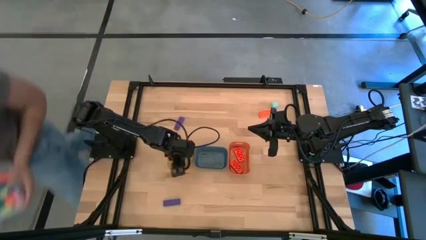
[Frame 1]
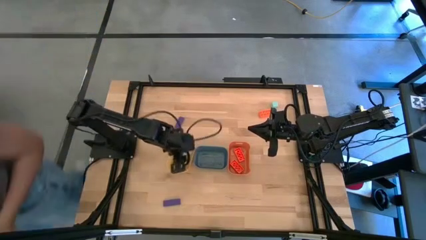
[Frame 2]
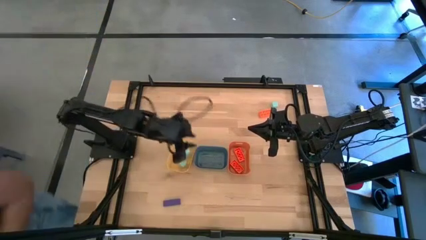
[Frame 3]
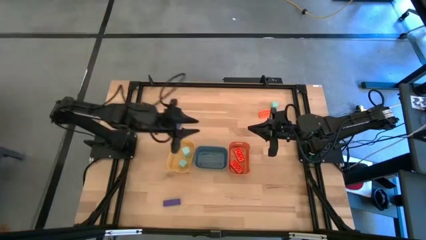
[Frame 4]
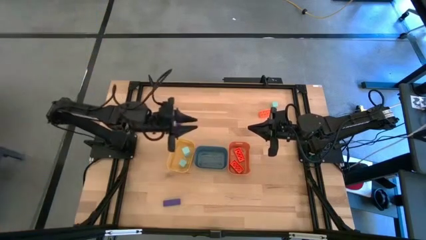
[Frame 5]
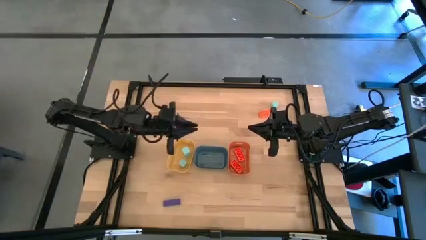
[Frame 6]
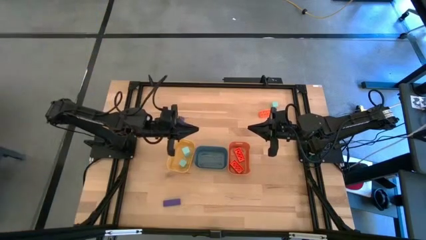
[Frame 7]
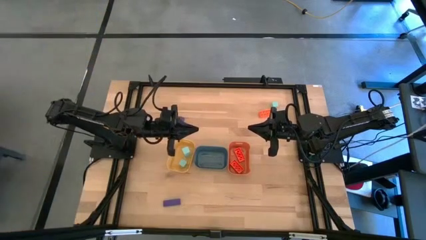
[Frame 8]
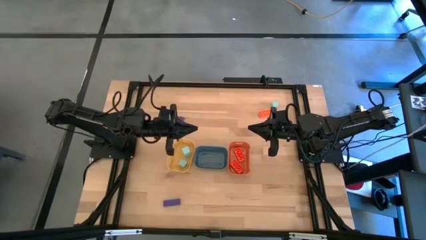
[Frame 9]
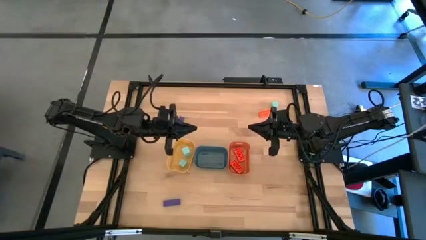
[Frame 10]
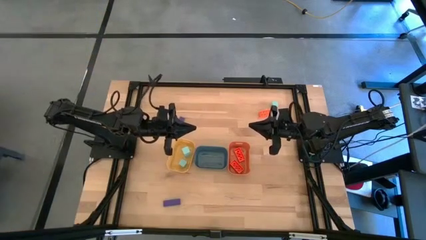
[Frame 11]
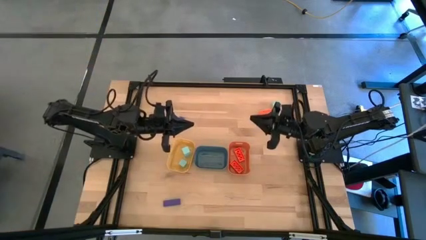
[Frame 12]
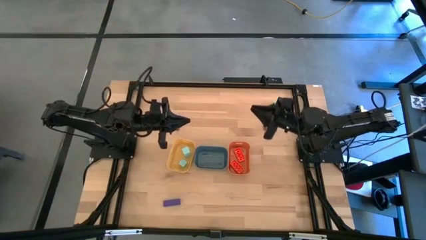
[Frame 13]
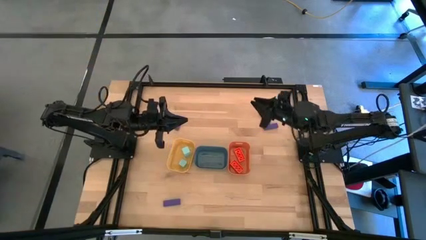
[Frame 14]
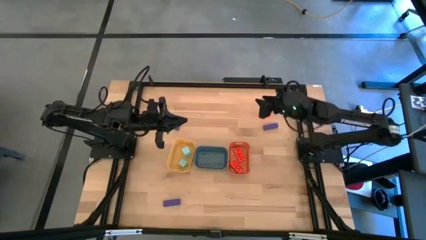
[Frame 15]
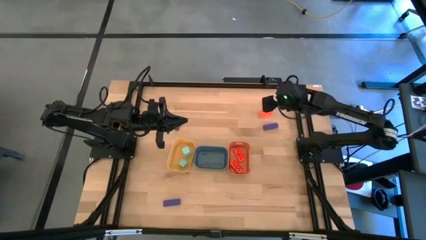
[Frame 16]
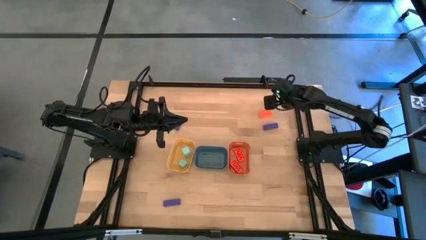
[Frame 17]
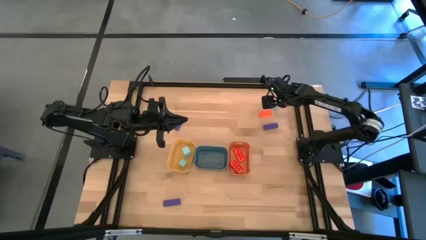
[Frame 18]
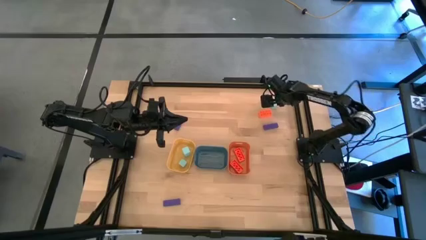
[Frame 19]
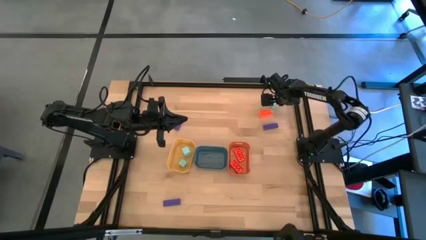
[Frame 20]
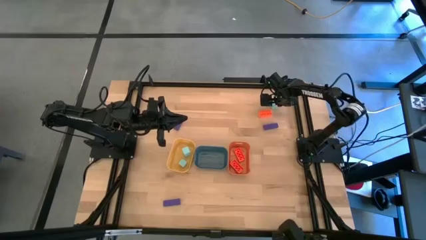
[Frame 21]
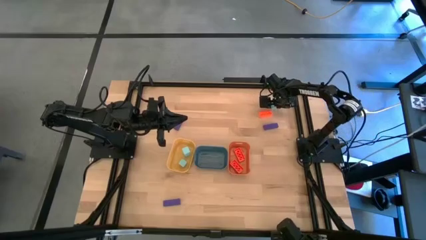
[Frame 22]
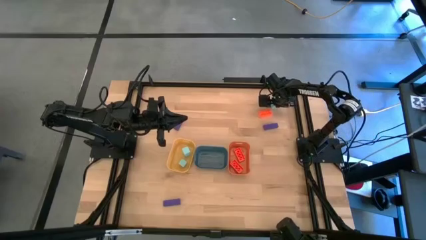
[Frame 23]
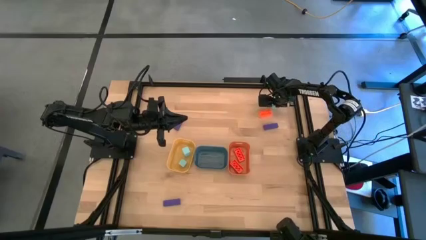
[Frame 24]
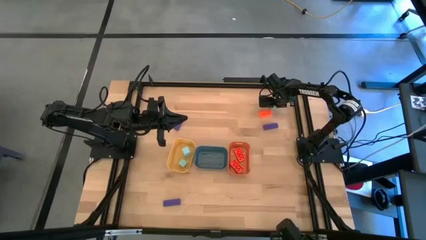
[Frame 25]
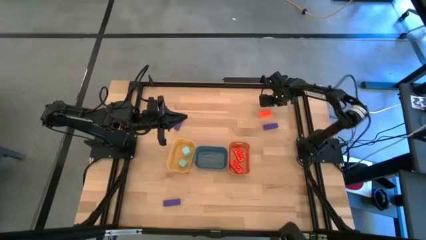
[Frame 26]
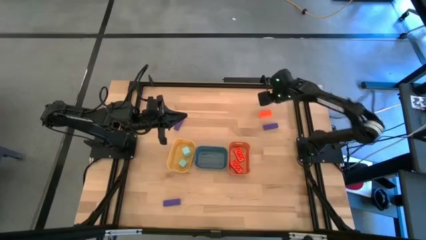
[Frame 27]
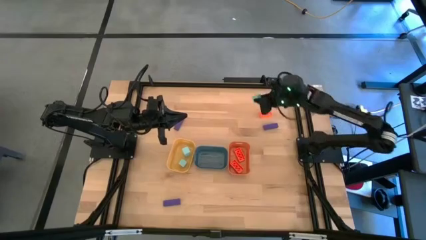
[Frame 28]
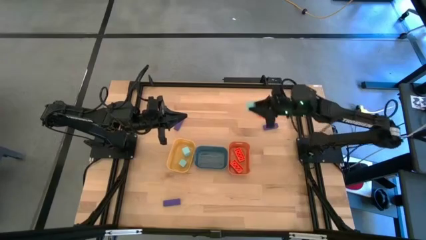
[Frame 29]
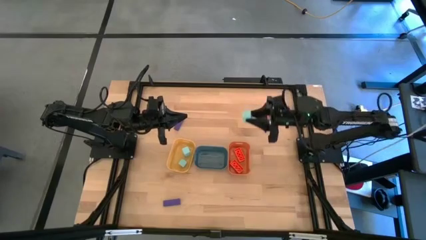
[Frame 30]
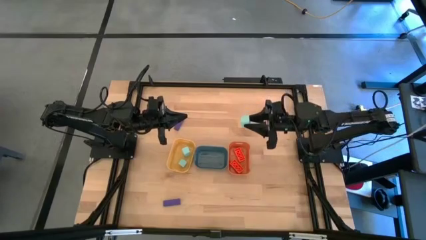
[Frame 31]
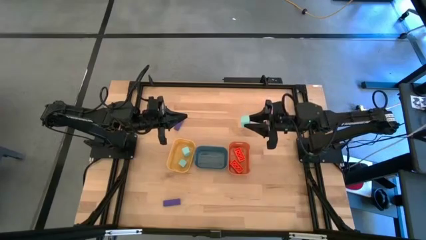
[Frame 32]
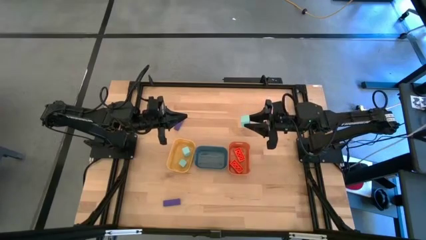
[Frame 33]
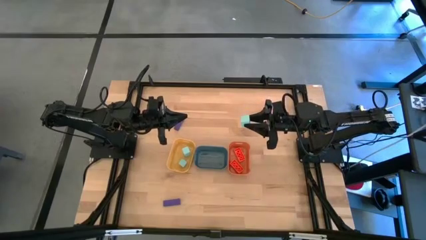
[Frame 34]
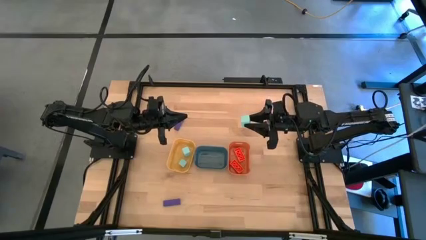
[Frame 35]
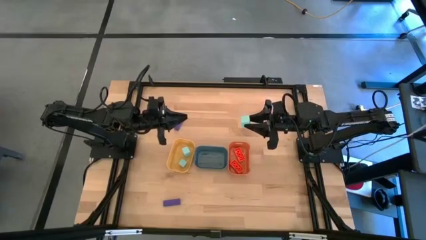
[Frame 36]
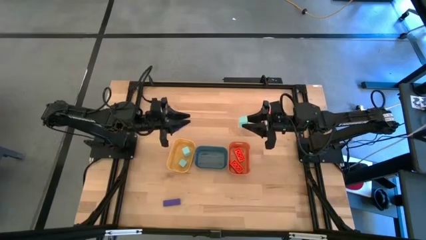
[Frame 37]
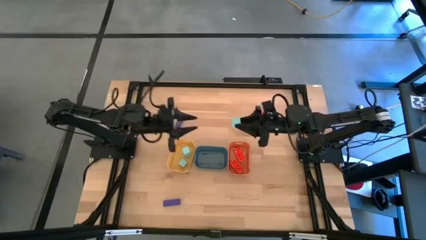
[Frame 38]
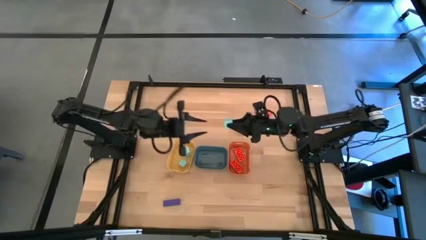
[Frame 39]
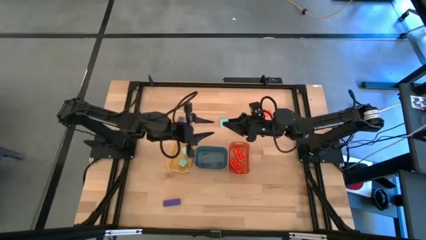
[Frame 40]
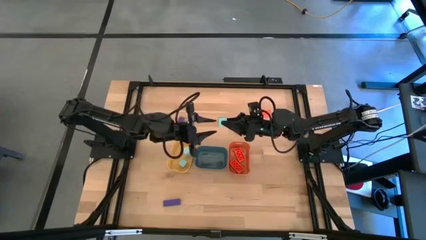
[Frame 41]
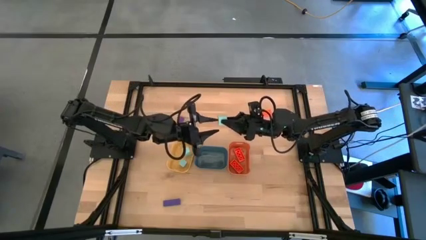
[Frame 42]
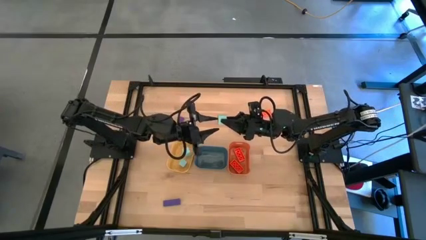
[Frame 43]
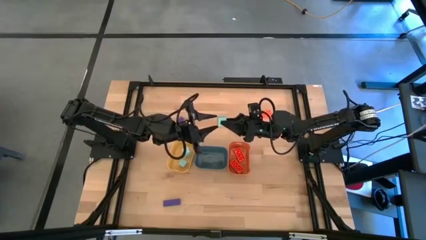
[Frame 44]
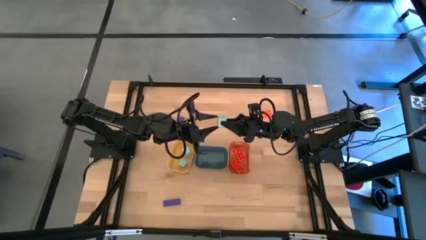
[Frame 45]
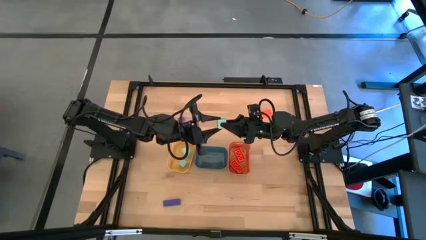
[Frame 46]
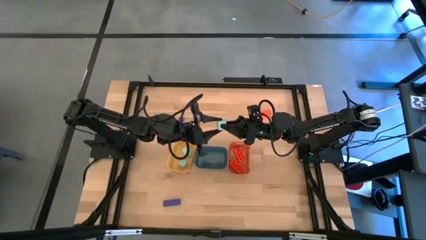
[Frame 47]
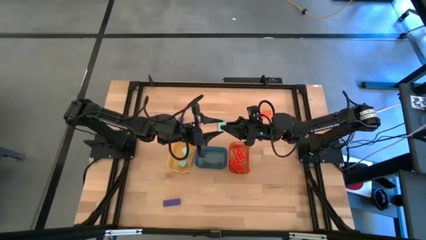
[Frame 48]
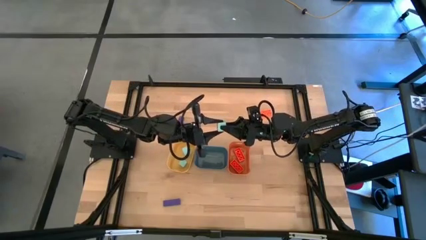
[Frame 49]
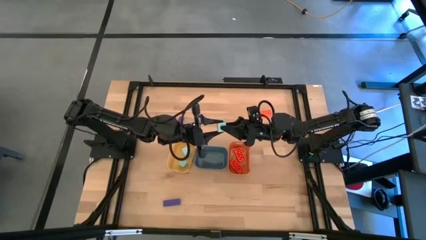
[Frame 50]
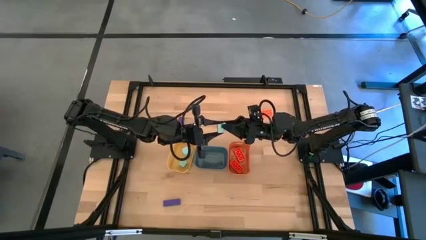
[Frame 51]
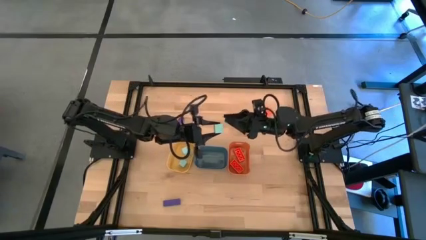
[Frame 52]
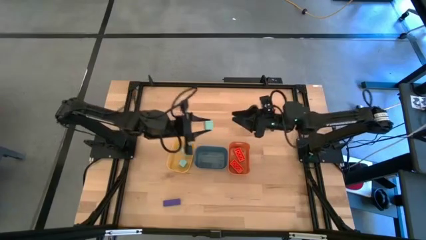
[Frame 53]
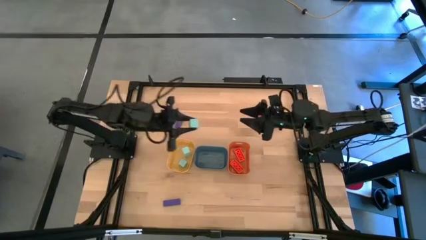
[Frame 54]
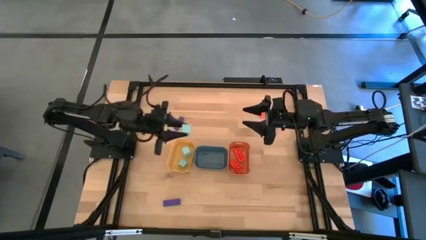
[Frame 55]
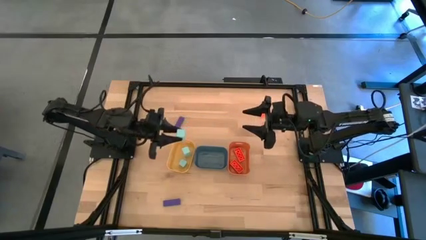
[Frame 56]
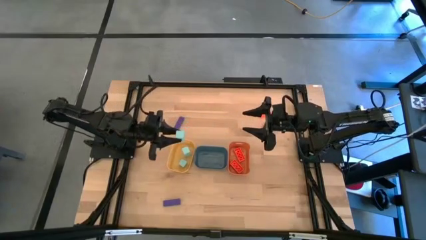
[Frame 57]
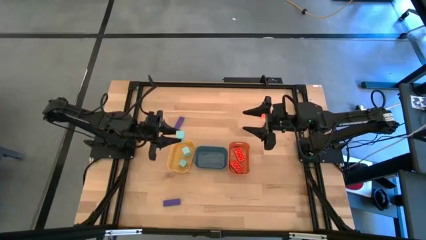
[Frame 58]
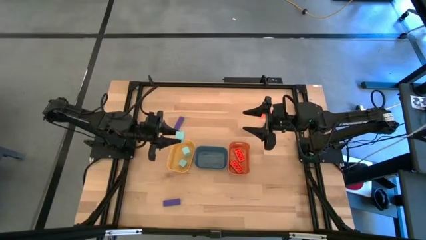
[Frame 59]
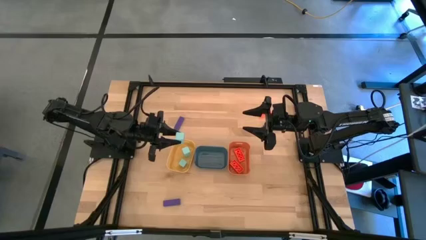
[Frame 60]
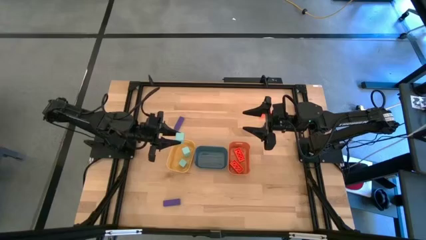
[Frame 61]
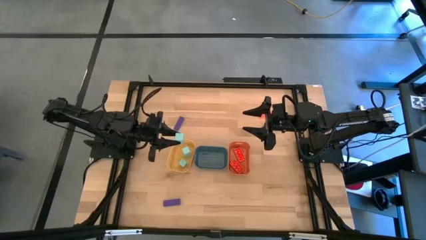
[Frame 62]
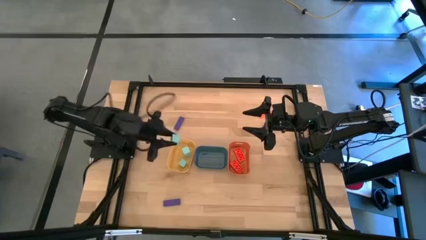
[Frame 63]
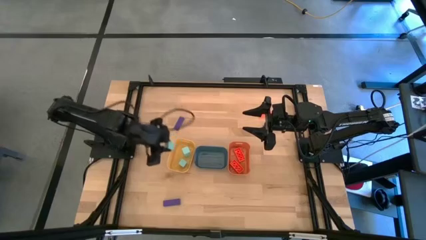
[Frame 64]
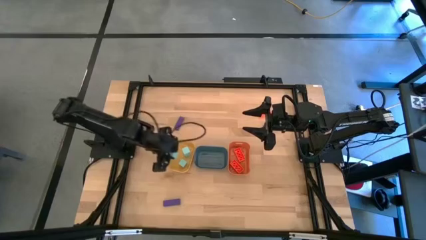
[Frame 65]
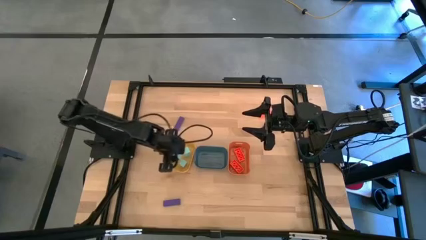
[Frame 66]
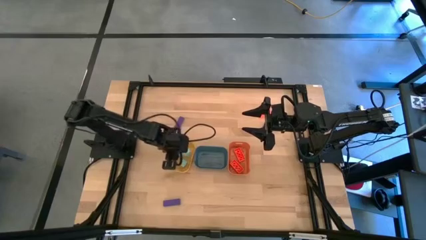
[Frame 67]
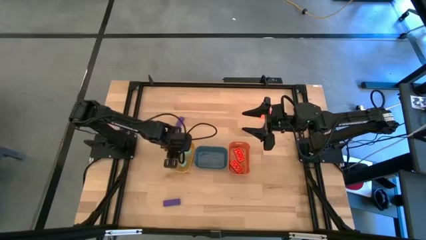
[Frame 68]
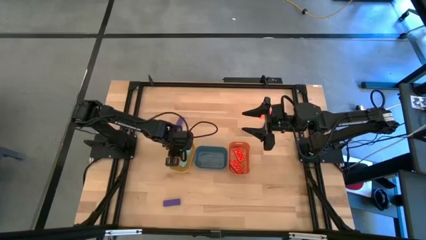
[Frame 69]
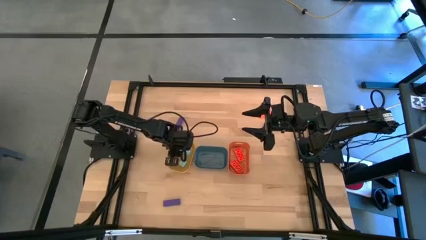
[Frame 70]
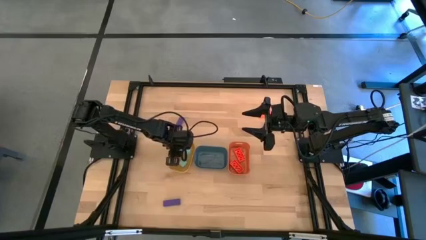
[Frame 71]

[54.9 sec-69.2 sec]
Task: Sort & place blocks by color
Put the blue block into the yellow bin

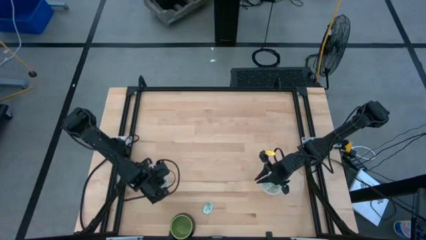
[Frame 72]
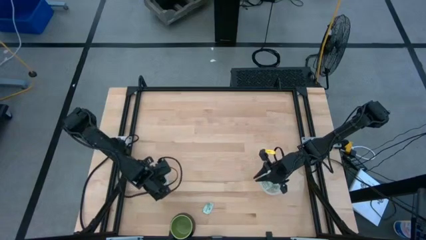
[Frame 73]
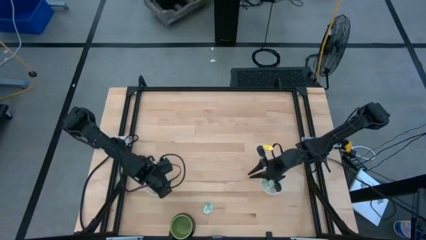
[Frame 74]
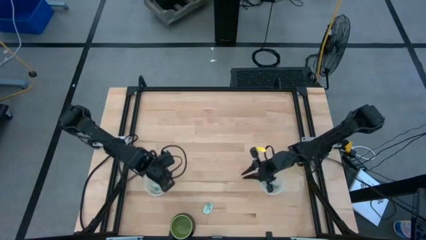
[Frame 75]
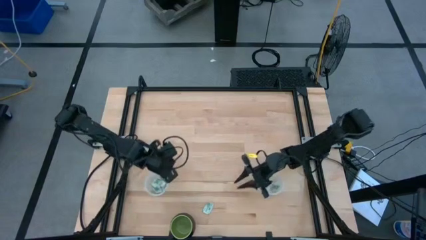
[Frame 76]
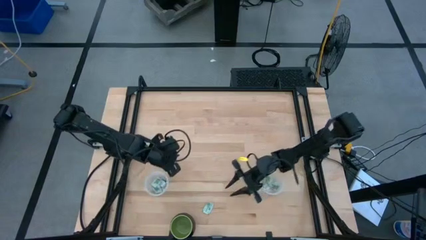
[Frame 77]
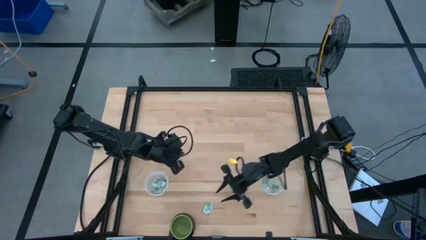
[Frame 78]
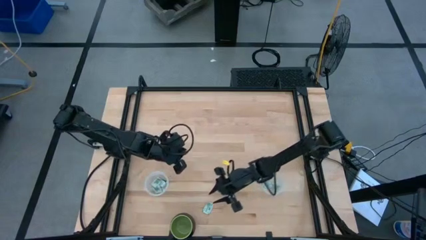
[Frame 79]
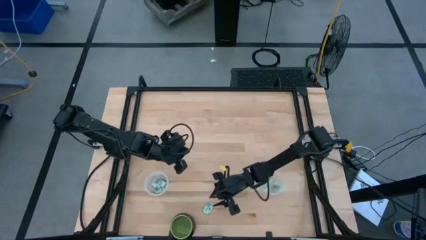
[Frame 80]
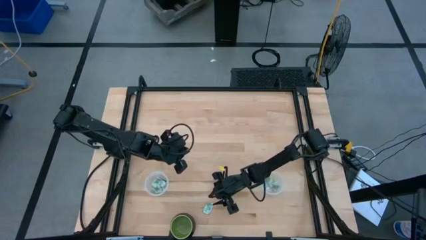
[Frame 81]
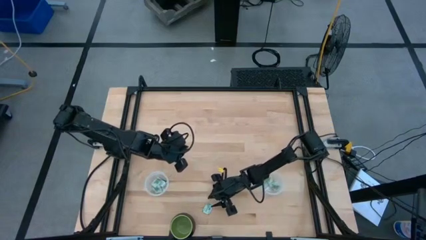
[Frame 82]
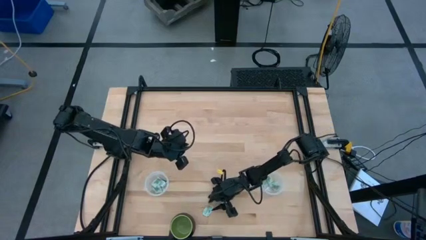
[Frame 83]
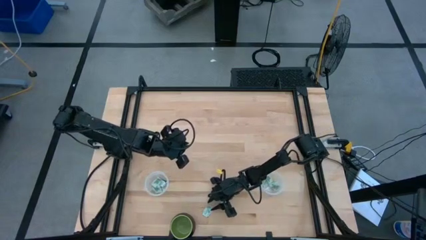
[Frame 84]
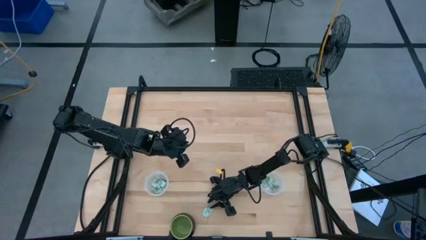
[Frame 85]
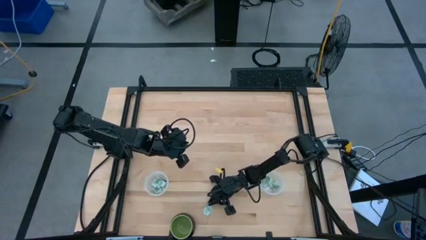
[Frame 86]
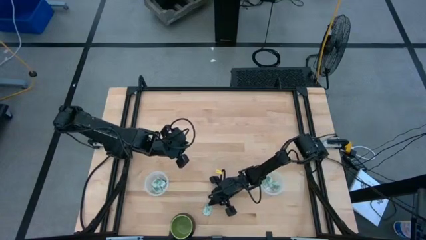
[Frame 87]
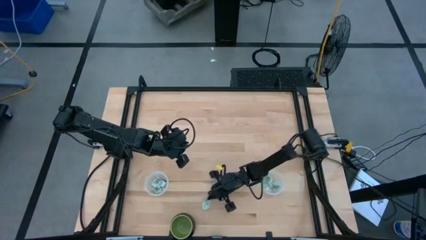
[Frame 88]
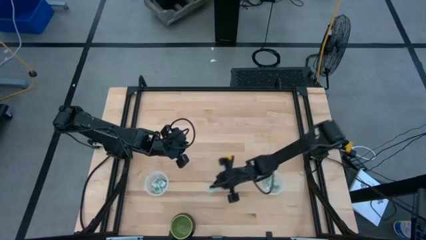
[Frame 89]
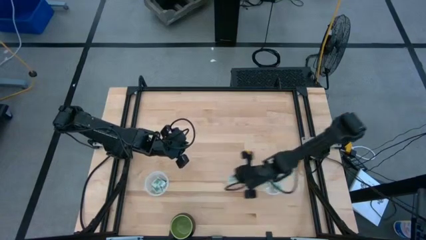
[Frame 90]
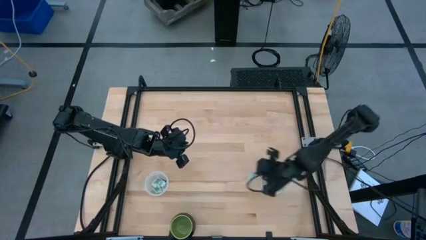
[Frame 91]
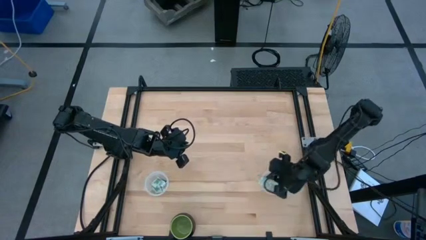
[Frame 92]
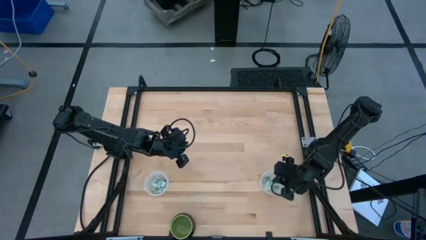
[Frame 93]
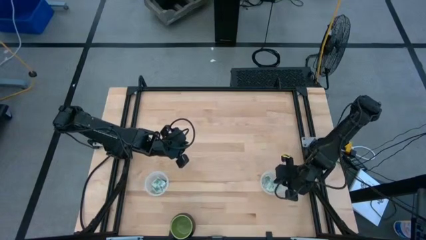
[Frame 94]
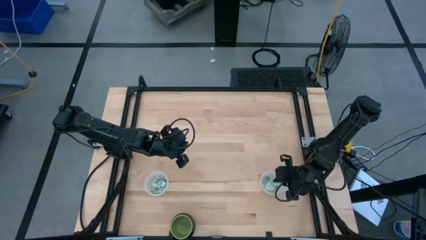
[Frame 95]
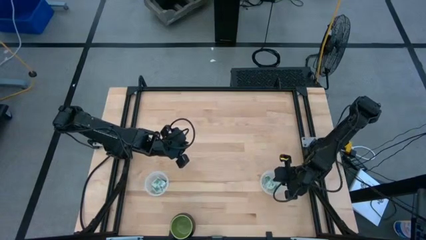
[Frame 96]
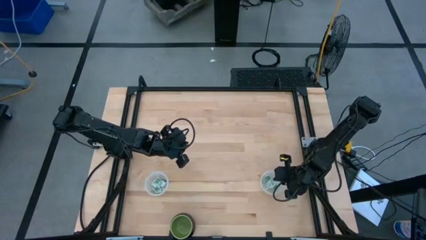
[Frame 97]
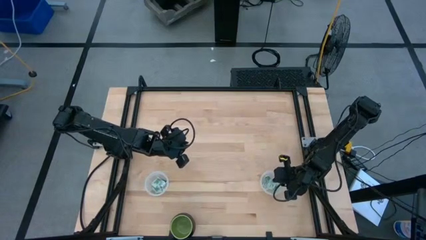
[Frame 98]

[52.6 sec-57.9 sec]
Task: Pick and place Stevia / Truvia into bins
Put the white stevia packet into the right transparent container
